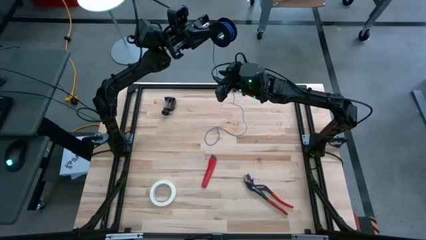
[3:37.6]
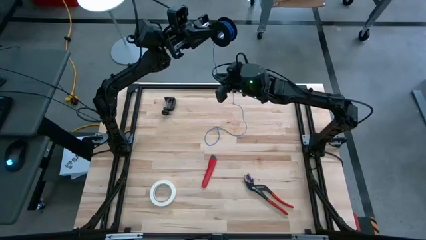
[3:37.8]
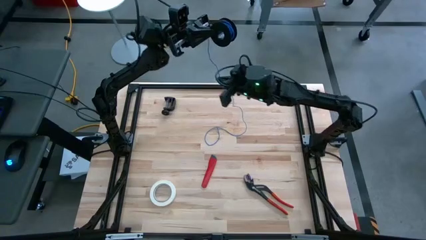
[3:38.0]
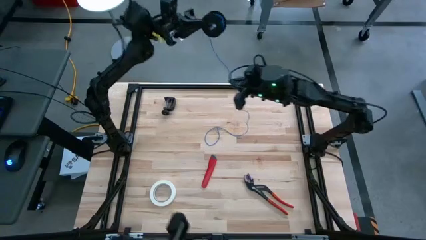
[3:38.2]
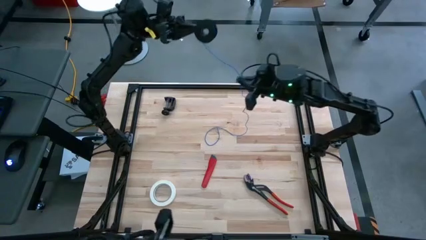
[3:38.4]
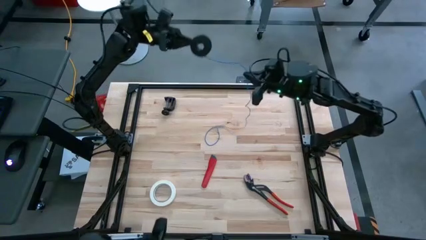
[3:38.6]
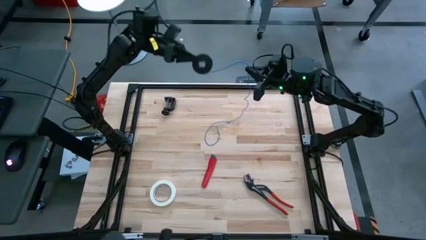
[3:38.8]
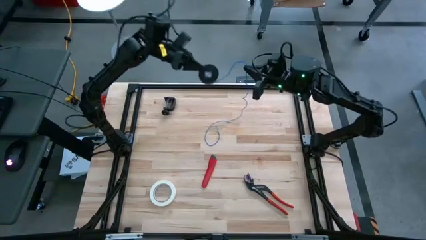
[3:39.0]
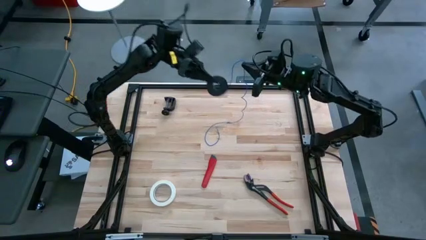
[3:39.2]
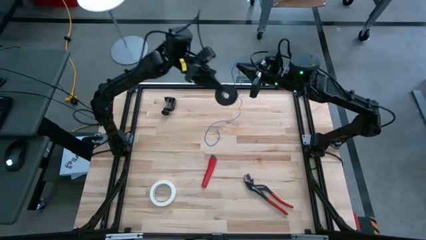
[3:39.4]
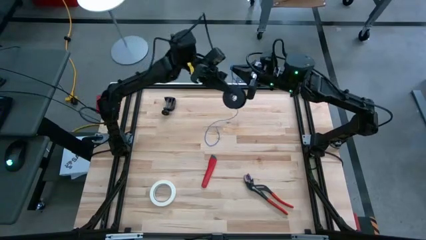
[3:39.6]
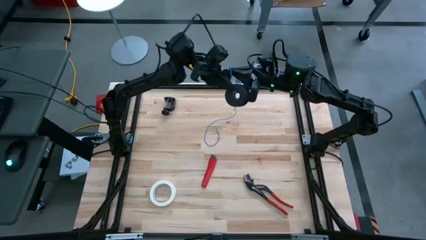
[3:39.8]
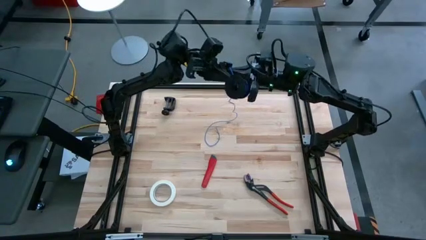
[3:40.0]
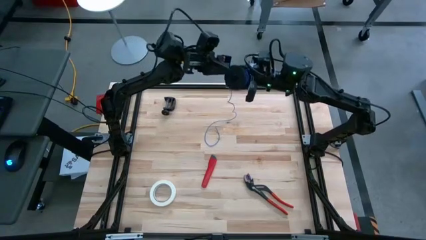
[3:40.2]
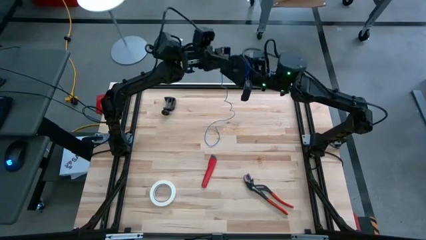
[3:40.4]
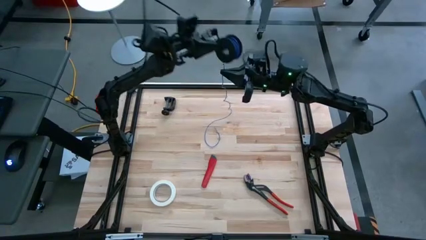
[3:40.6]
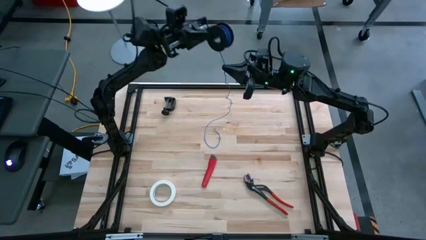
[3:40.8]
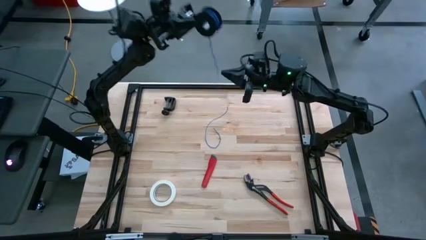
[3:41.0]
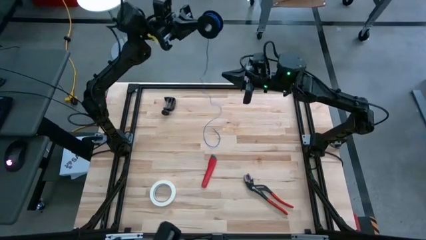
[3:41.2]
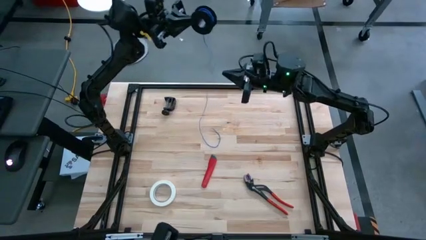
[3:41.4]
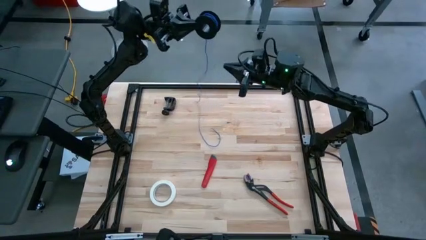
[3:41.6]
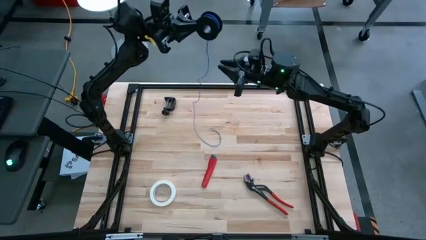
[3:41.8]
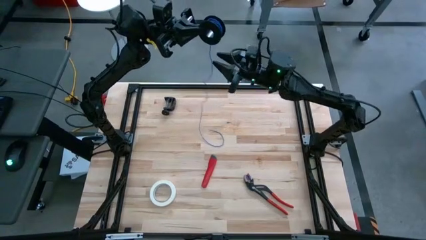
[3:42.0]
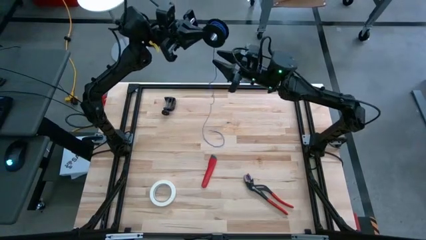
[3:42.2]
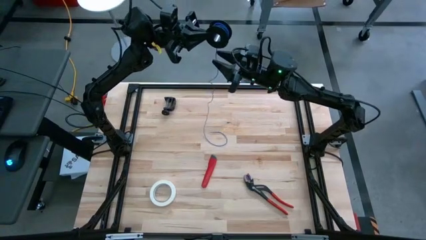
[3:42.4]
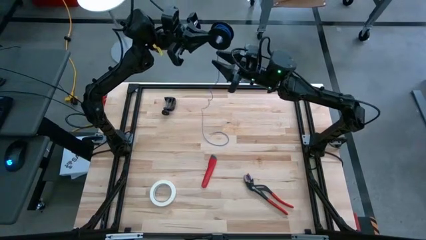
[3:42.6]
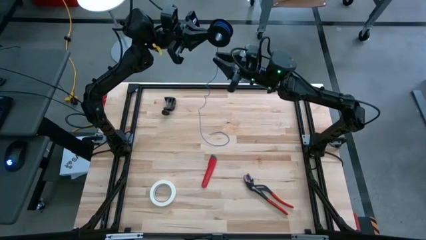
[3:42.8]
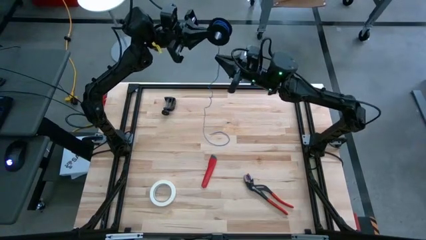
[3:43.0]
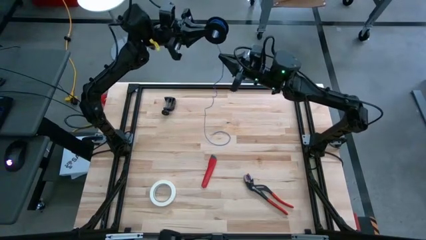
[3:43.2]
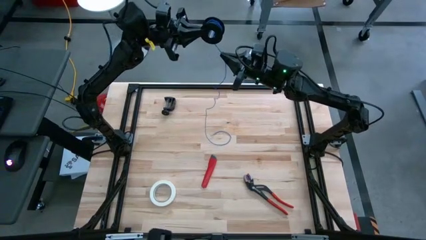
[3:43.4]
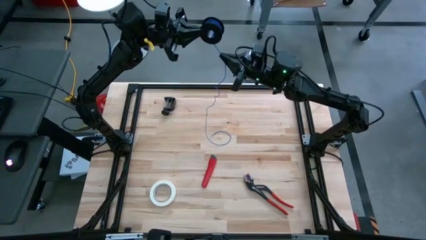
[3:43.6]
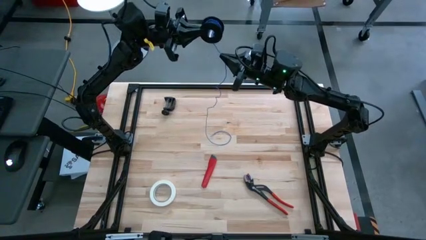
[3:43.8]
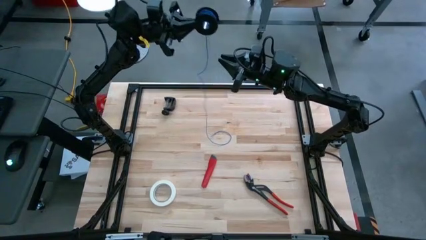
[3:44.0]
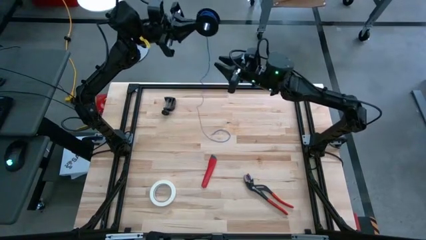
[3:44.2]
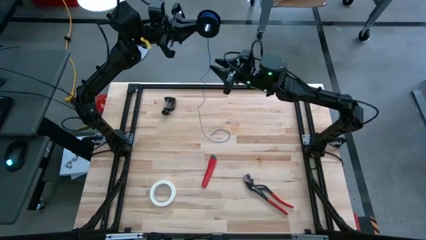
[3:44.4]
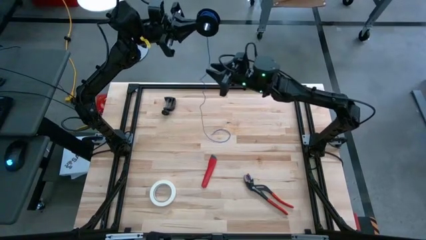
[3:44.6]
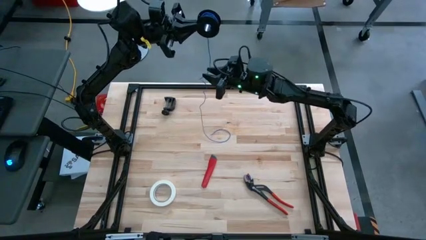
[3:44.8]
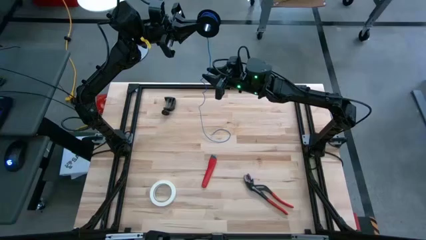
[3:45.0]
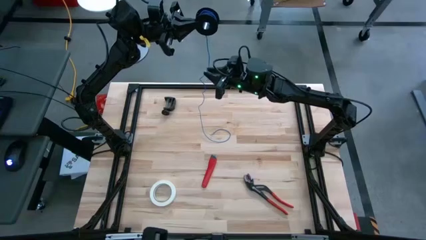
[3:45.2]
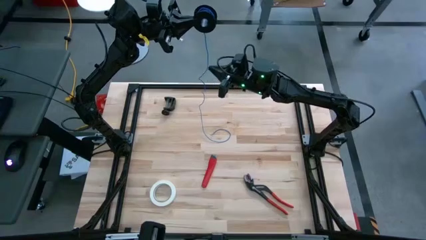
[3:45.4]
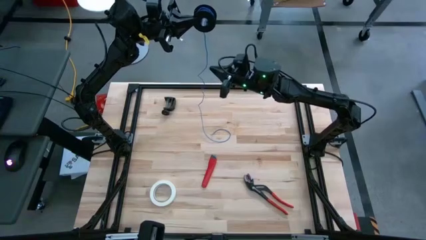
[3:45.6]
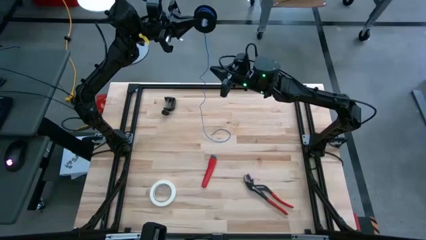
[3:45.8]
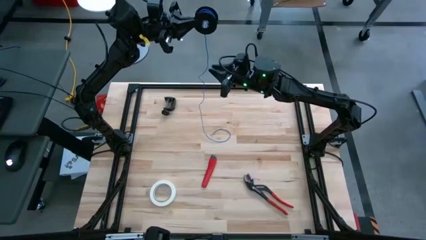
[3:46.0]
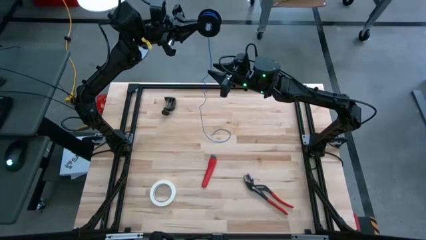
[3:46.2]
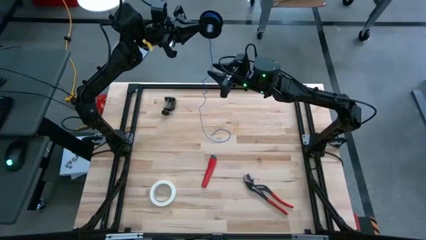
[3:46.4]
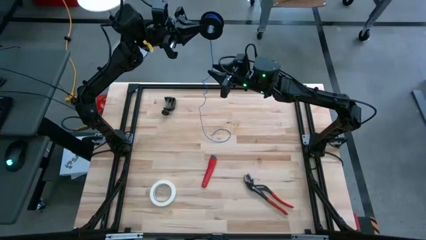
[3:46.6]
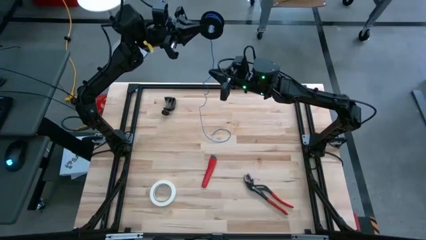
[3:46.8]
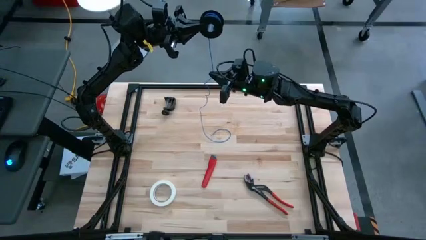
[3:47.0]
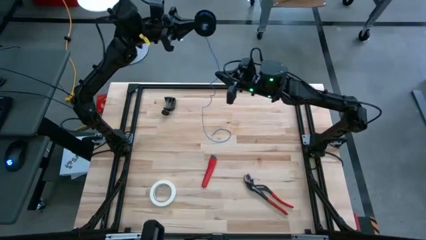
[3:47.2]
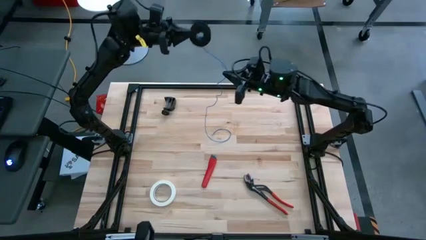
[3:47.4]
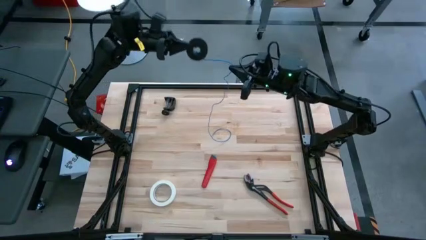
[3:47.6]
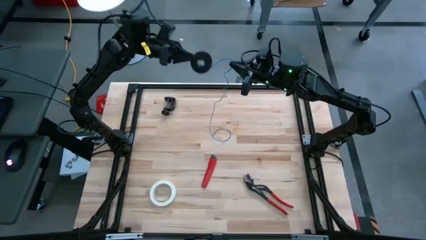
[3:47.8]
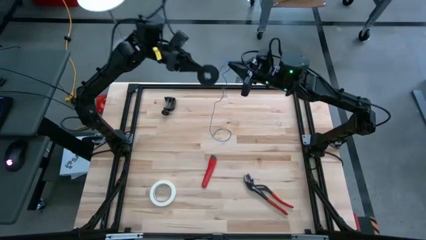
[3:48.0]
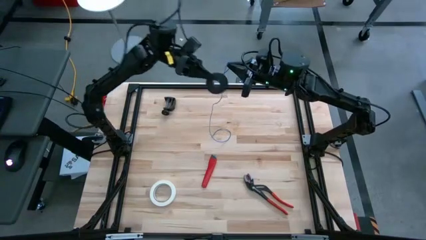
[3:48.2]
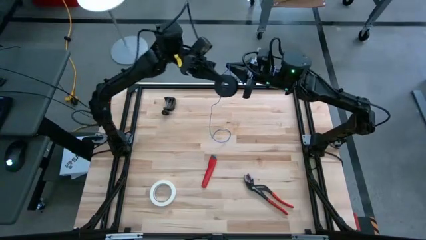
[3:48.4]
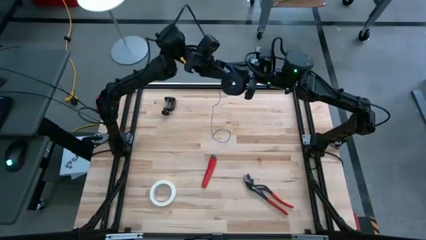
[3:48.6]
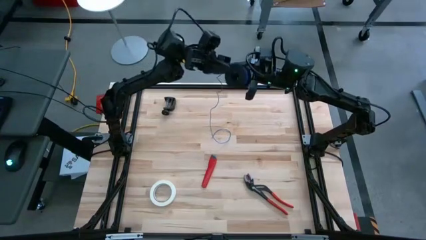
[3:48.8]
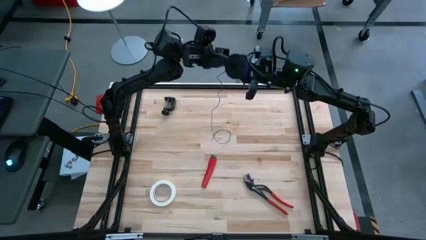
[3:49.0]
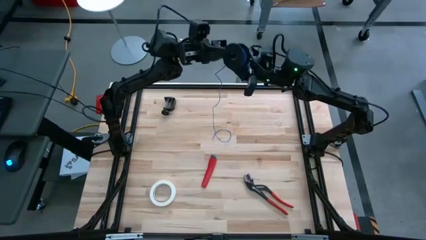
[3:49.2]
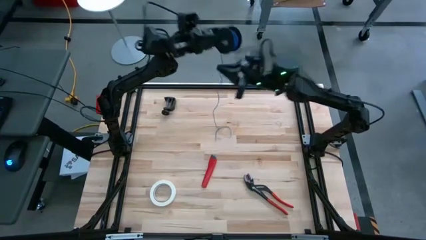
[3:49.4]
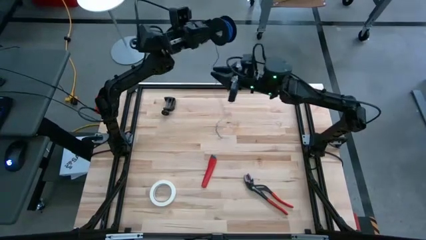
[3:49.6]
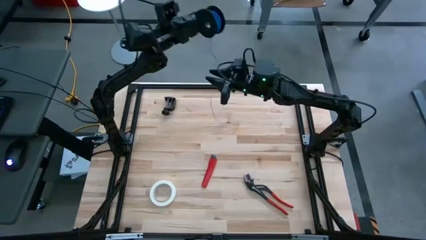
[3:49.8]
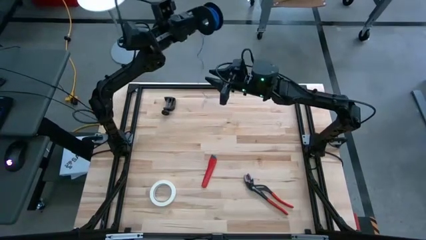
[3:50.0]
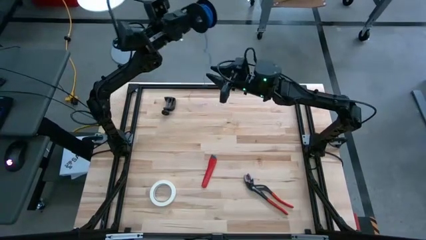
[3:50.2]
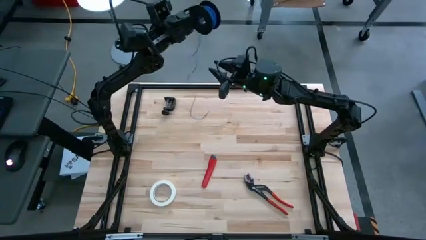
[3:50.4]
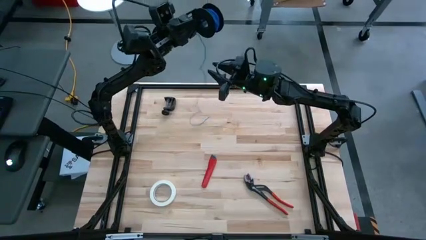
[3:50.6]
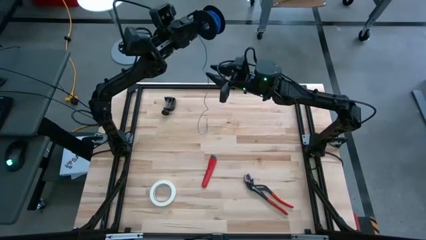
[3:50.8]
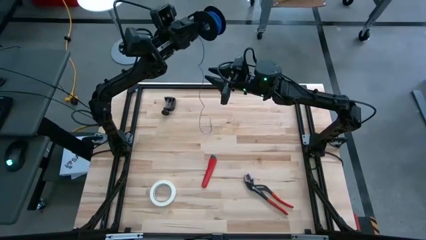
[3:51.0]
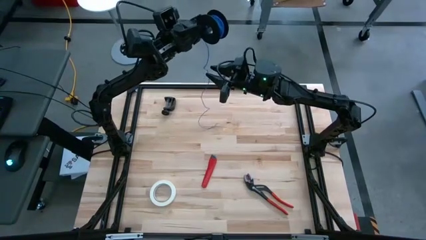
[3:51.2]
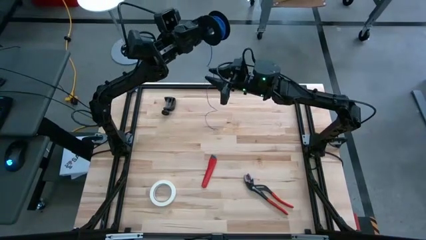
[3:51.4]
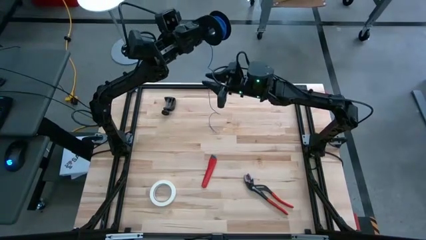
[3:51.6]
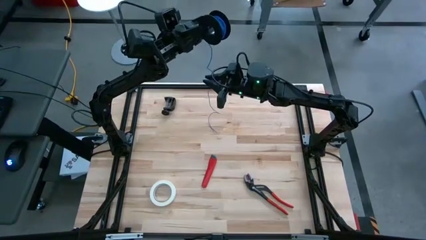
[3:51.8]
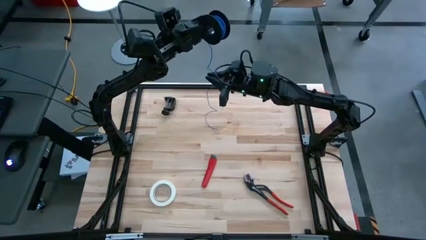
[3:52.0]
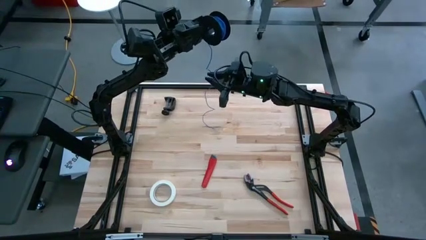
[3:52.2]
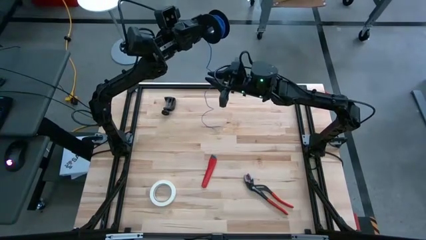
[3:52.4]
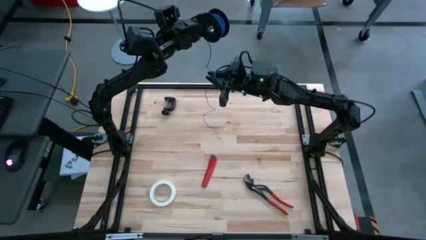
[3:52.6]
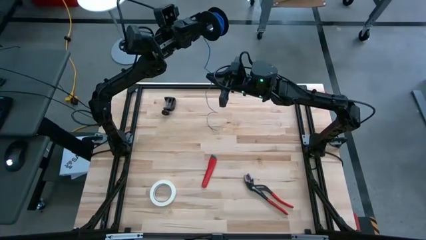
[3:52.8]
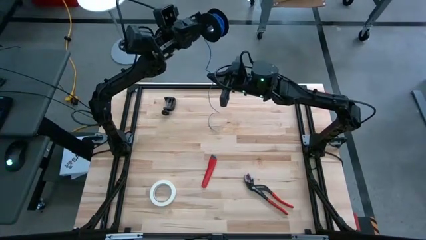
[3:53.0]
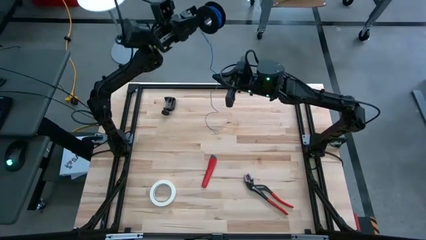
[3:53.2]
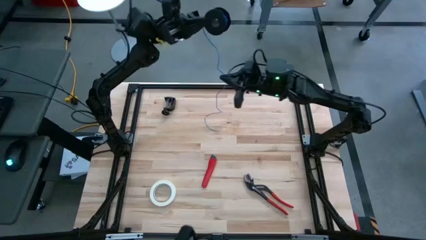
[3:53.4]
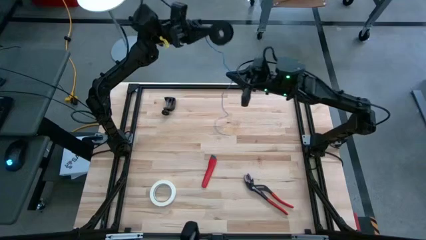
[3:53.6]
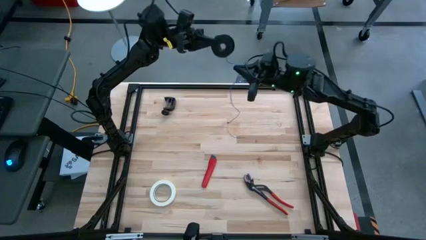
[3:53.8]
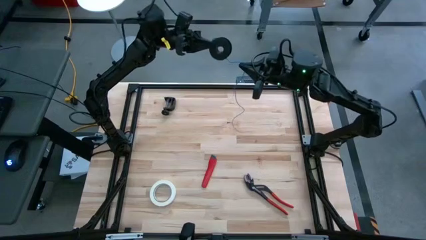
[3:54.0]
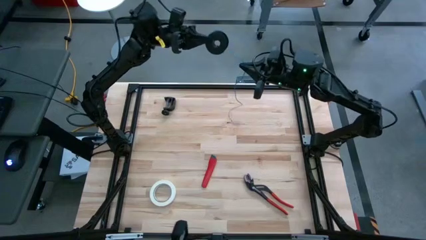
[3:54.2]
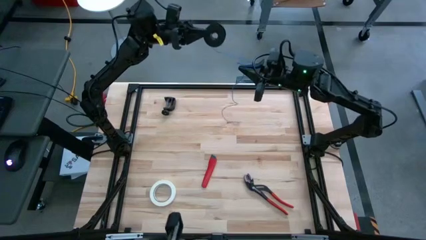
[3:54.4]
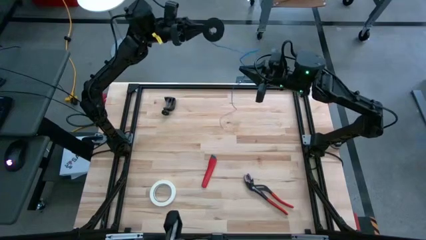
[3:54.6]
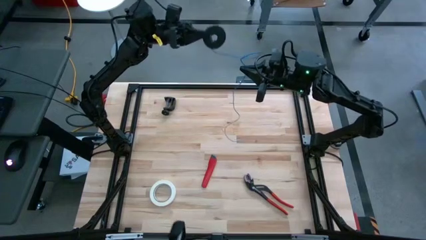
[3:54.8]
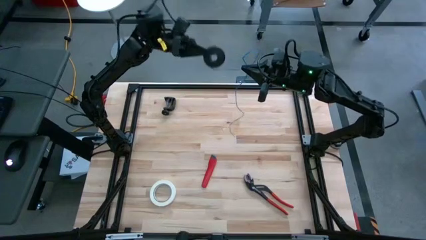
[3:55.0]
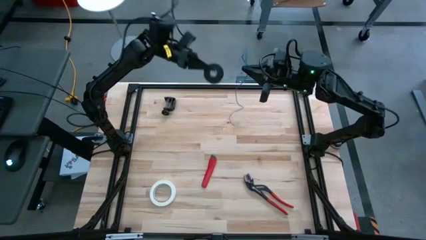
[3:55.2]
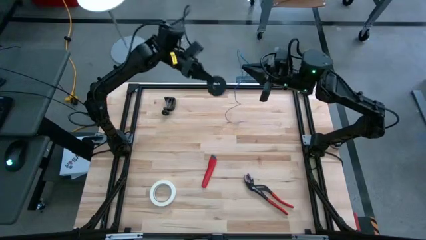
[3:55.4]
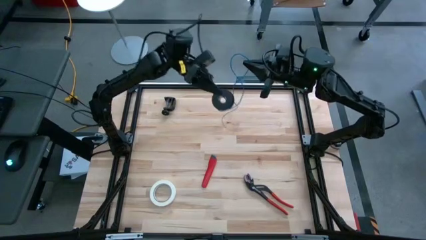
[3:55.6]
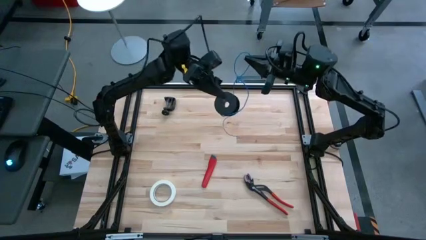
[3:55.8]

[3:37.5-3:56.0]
Task: Coil cords
Coil the blue wire cable onto the black spool
